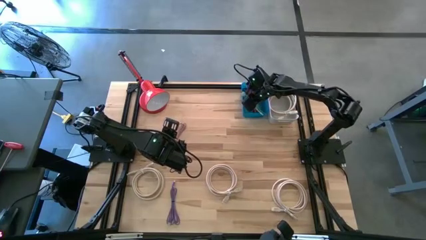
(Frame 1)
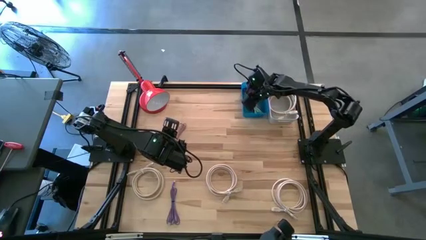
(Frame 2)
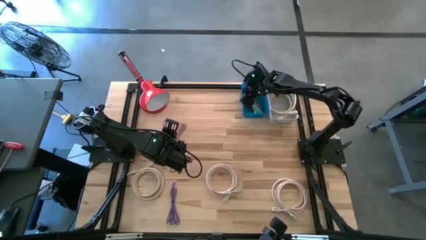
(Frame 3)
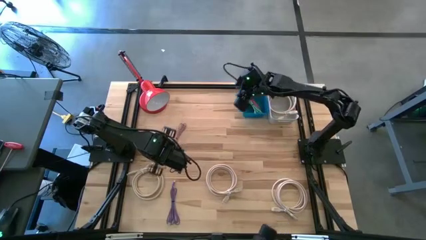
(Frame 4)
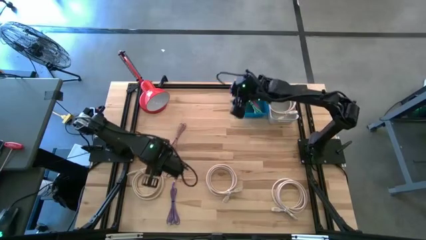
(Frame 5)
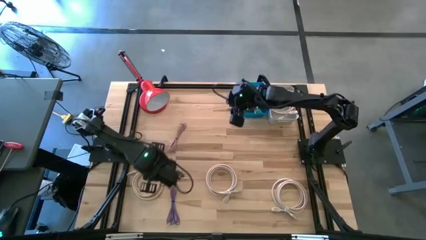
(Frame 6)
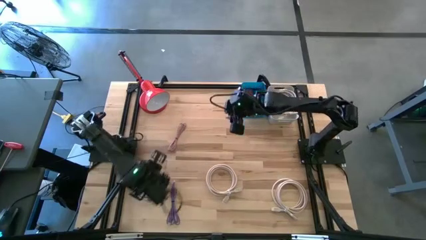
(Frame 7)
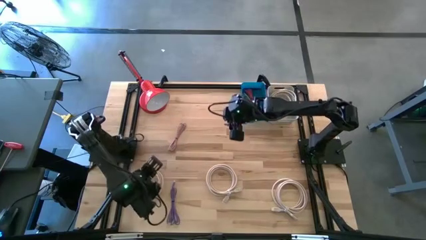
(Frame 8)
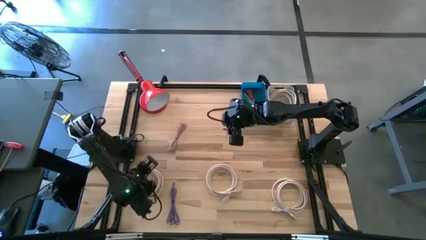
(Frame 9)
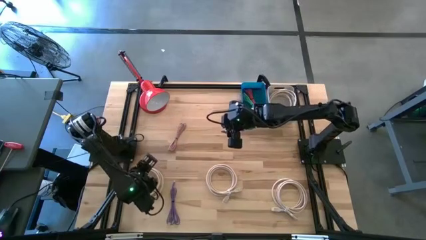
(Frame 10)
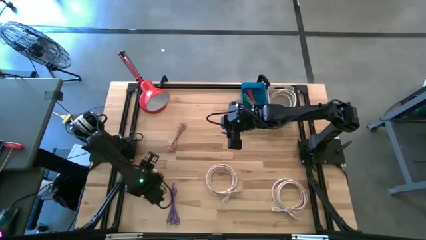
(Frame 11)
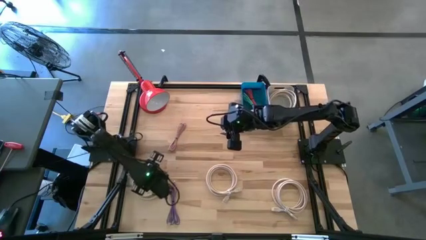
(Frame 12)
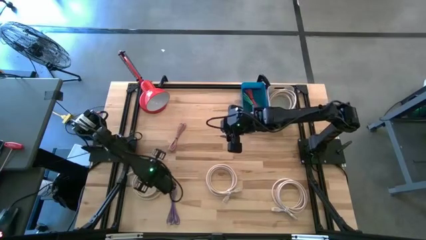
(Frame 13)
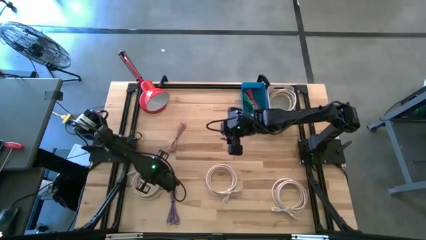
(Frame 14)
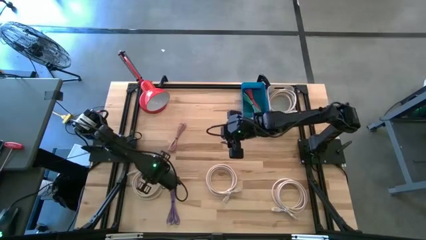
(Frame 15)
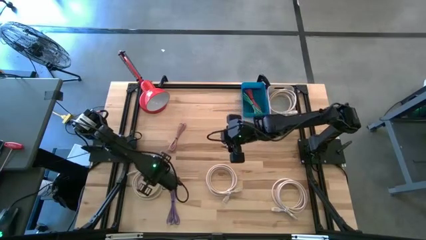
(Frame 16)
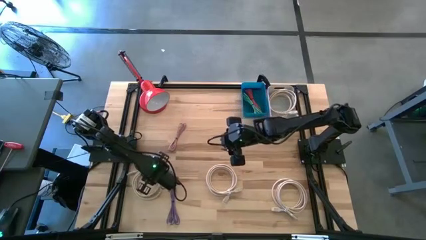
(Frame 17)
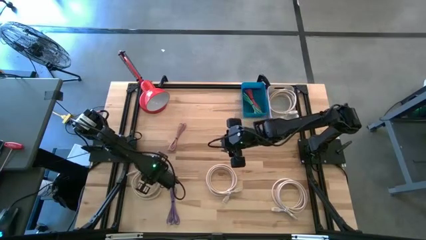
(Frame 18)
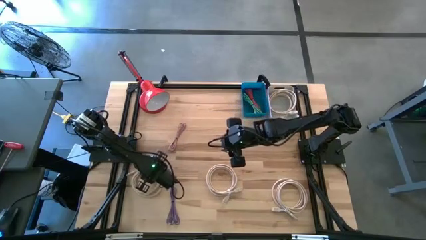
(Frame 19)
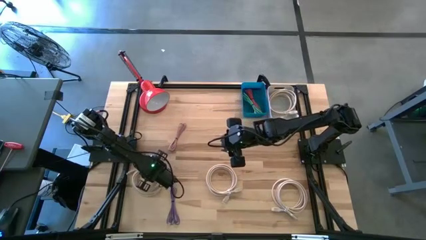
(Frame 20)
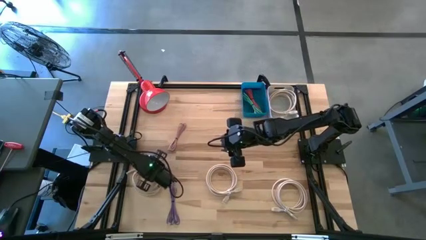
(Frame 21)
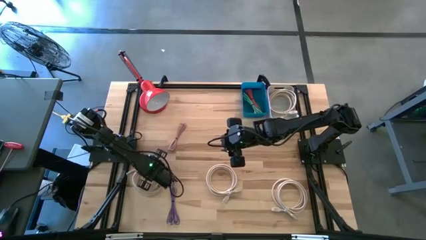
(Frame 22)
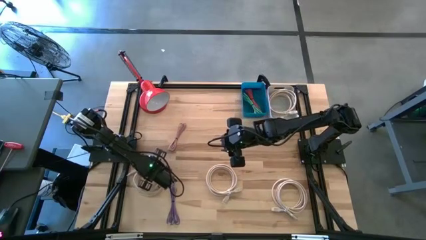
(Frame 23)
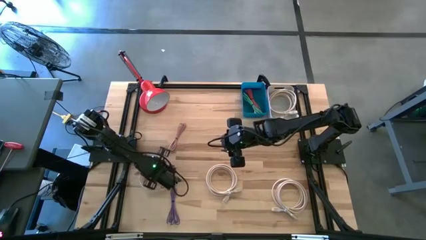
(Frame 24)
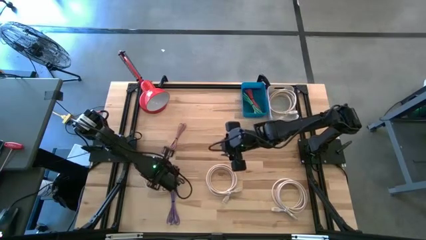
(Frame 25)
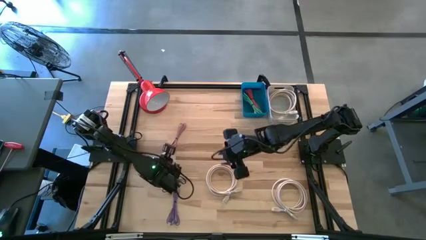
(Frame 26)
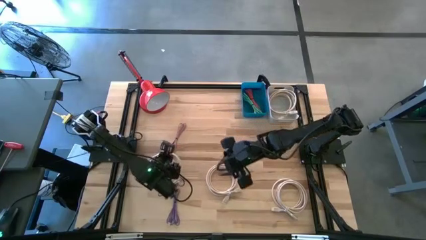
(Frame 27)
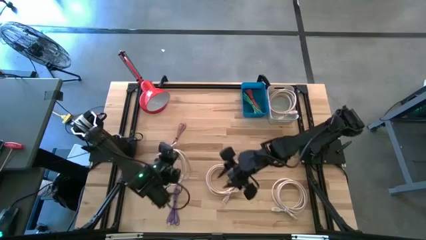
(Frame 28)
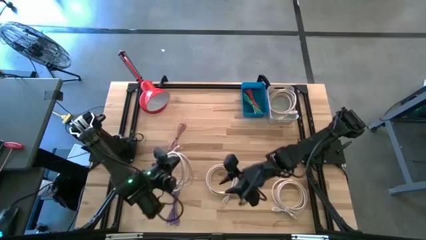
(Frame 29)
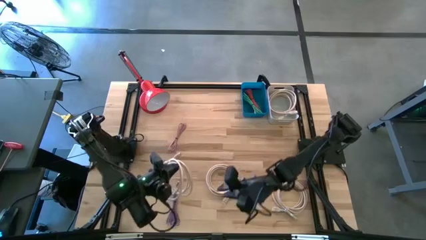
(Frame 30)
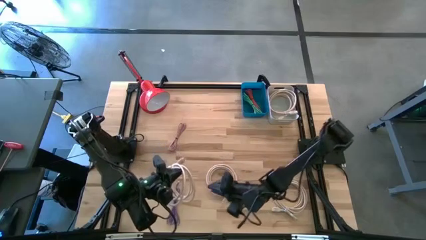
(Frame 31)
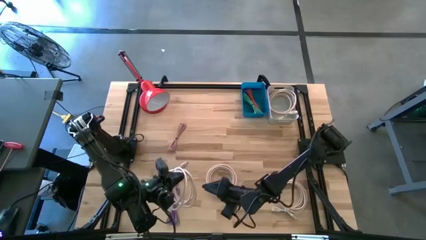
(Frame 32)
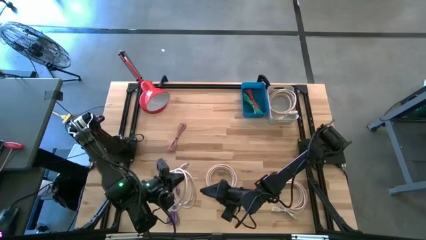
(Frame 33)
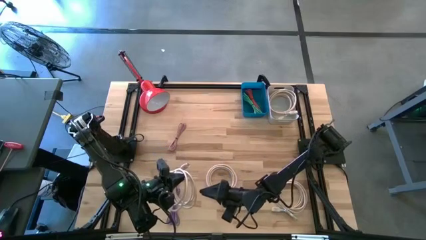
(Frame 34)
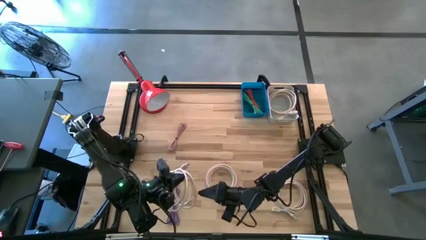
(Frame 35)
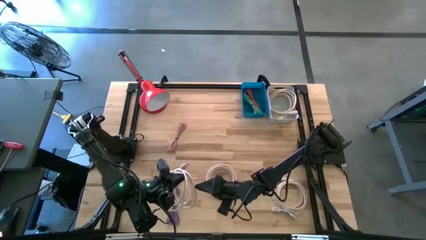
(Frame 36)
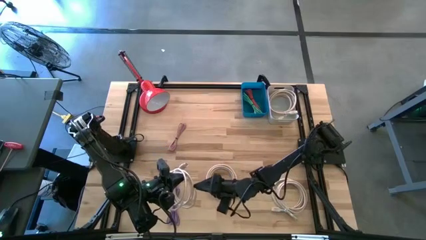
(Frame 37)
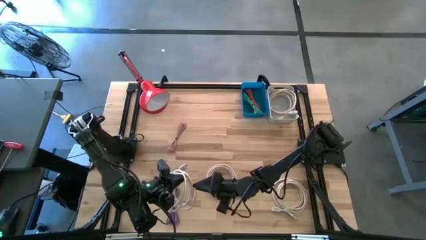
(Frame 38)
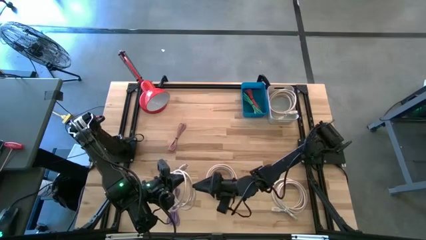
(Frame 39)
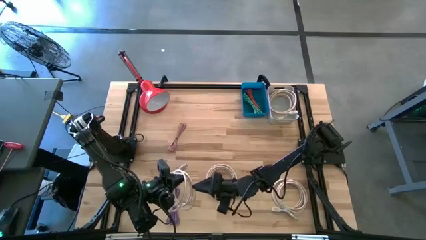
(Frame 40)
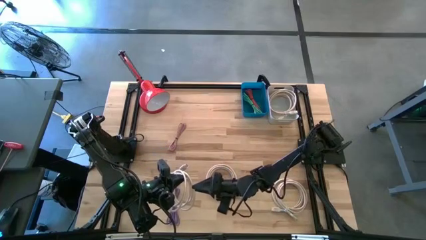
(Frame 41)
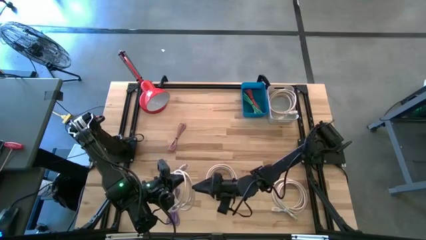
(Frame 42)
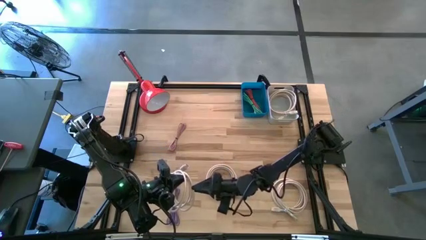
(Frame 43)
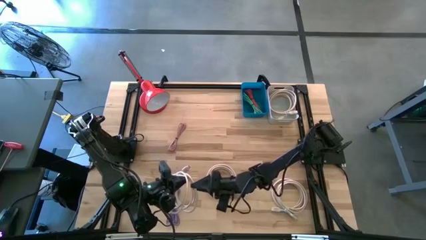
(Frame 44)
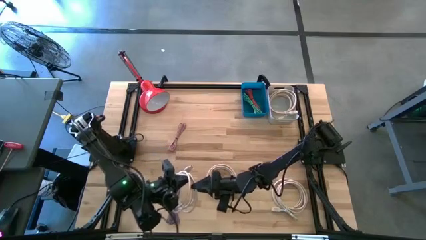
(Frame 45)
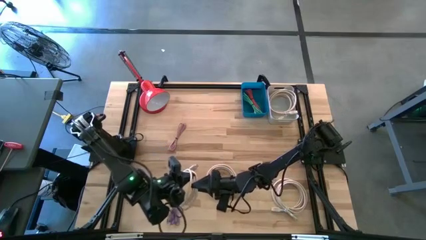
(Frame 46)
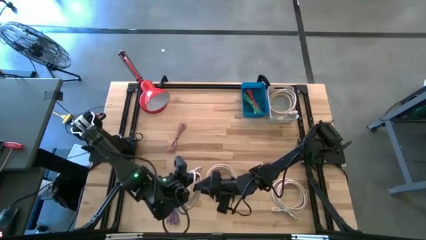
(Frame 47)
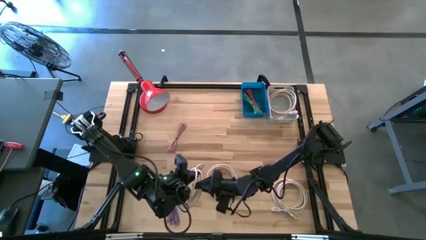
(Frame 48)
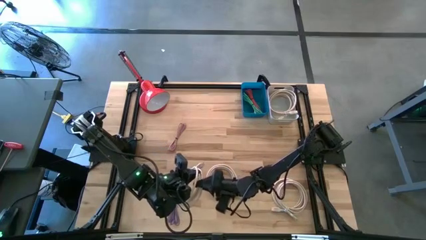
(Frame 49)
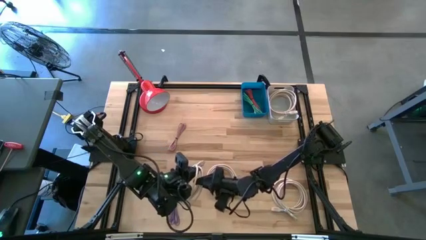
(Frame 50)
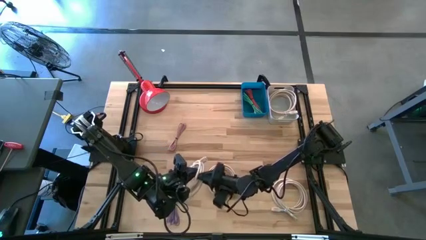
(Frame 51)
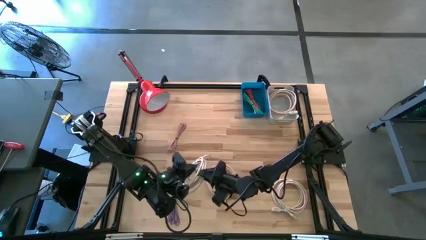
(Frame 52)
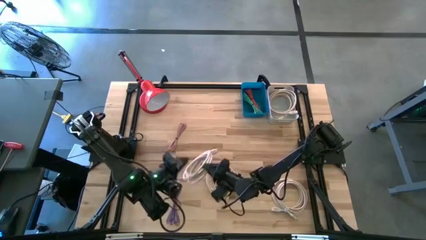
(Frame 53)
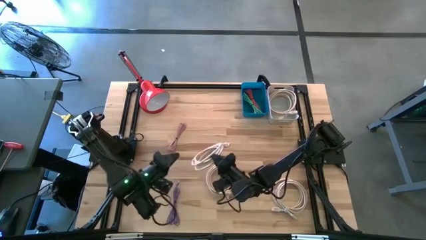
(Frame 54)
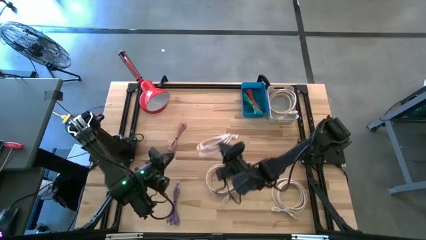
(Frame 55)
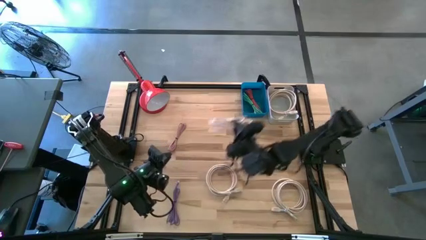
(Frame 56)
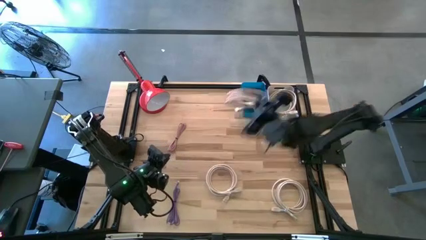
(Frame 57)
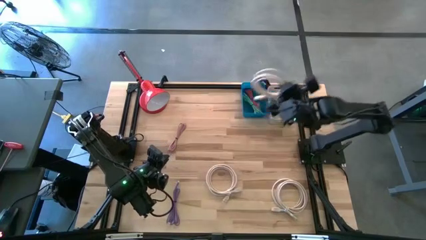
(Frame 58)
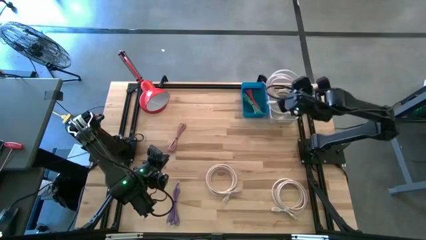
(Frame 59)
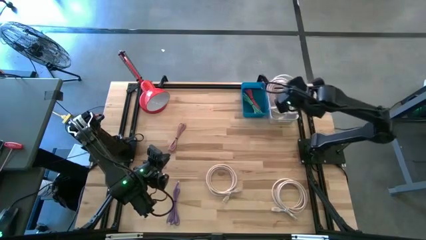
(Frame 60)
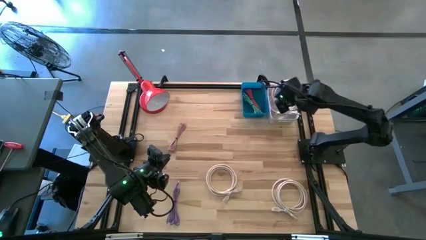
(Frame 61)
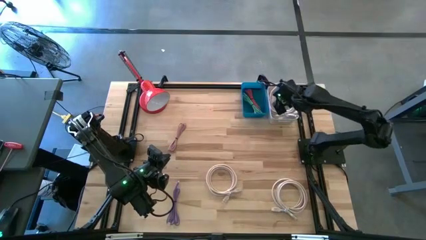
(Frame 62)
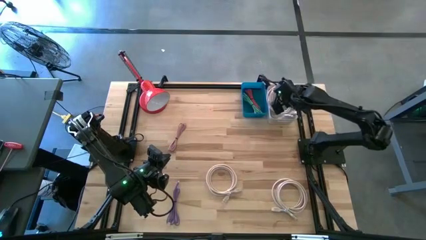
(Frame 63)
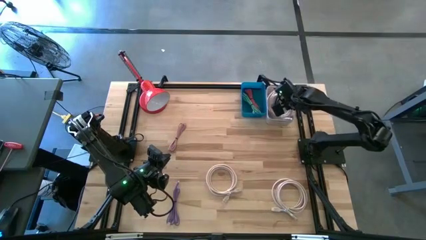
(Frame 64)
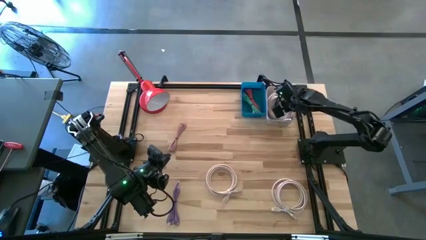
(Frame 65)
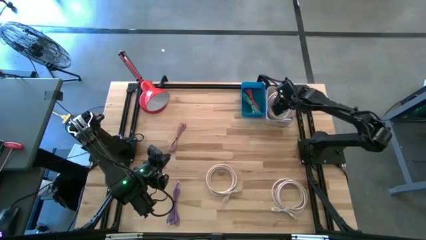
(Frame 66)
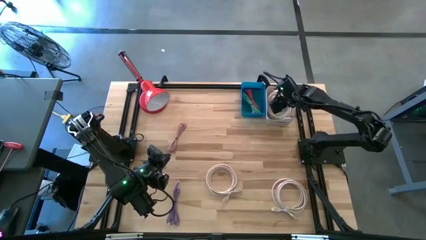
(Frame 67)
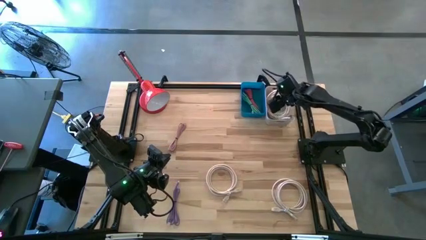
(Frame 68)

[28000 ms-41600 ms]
Task: Pick & Place USB Port
Put the white HDMI cable into the gray bin

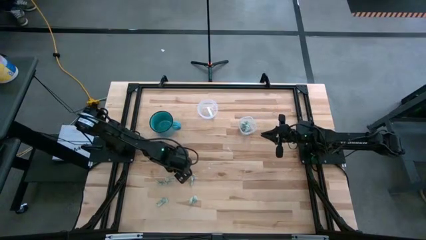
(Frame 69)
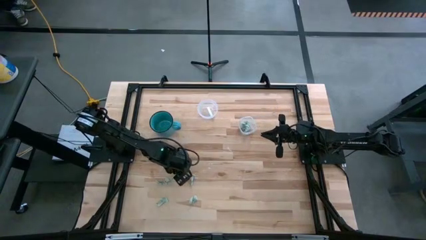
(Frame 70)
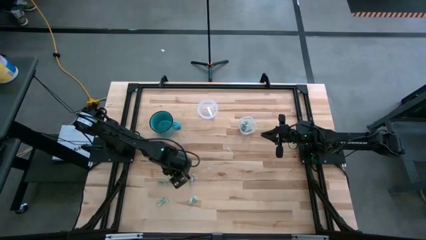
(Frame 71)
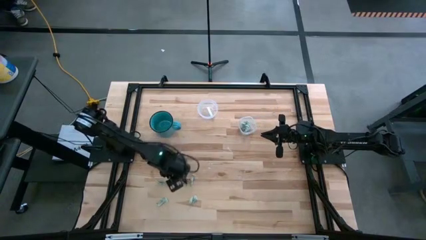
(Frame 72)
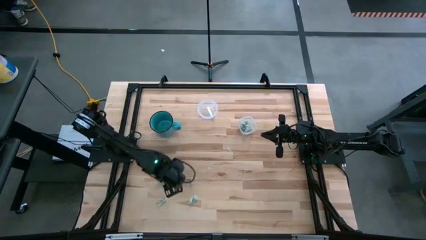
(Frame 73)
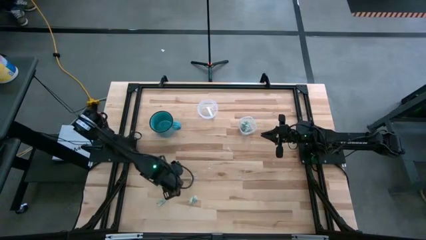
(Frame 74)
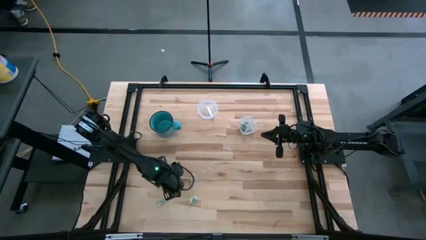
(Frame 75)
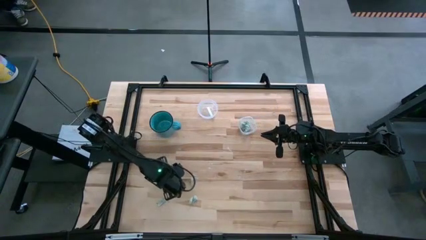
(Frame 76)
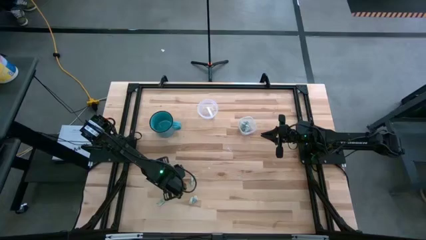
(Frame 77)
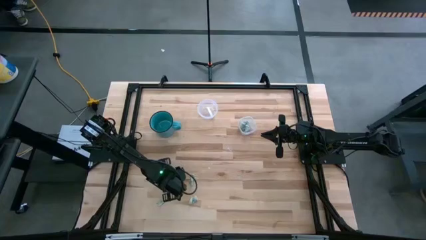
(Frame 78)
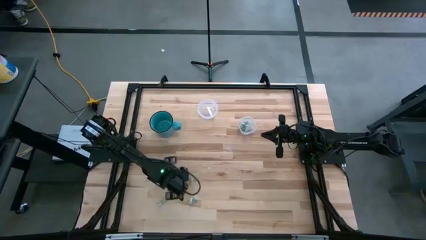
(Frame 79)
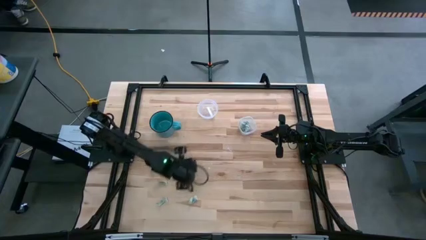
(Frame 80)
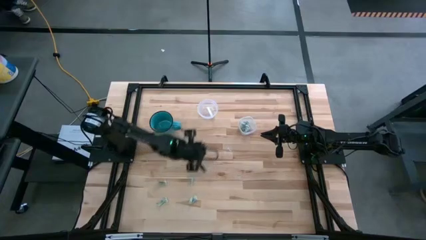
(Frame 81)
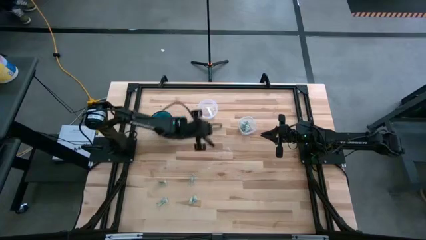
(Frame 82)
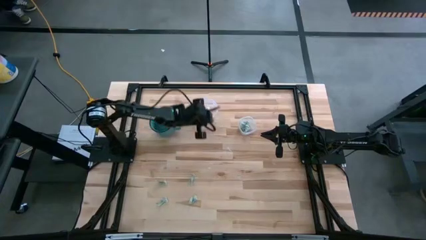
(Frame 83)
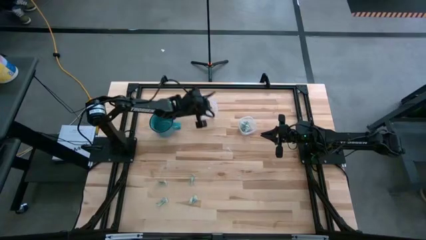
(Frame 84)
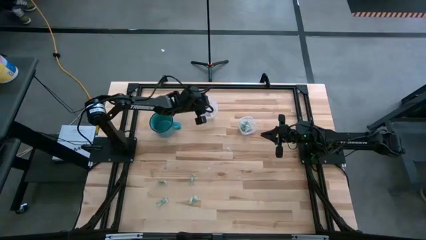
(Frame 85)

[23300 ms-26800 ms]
Task: Pick and place items into bin
Put the stevia packet into the large transparent bin
